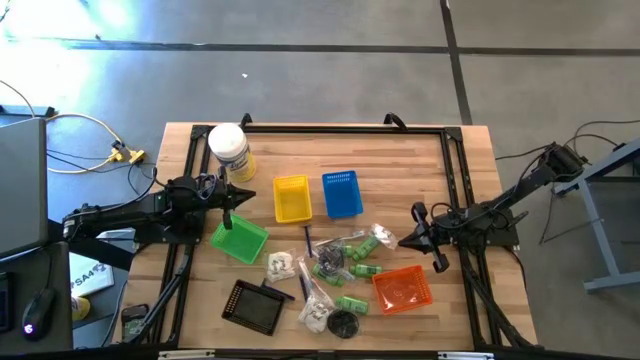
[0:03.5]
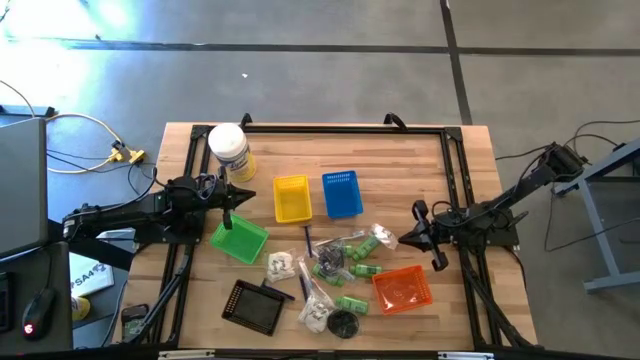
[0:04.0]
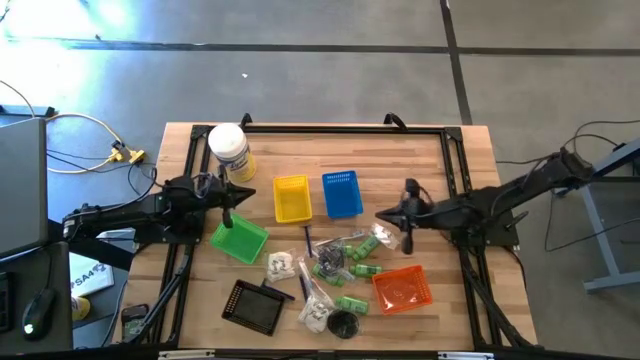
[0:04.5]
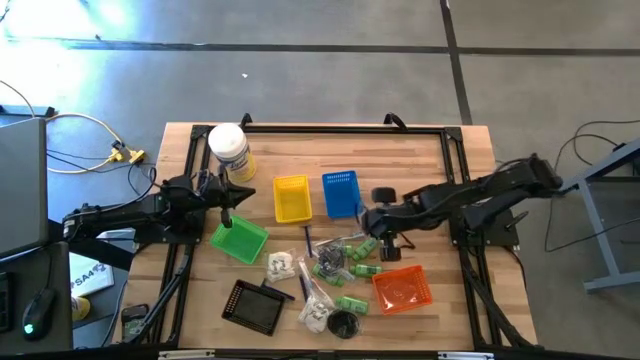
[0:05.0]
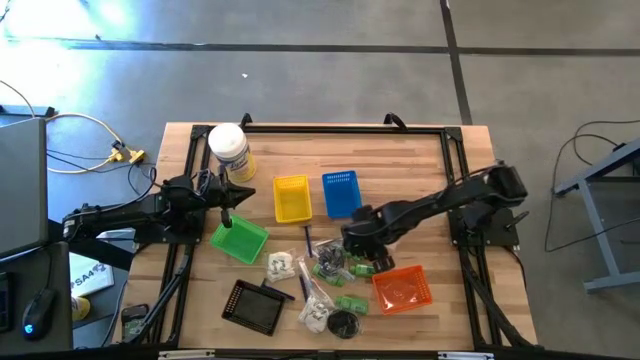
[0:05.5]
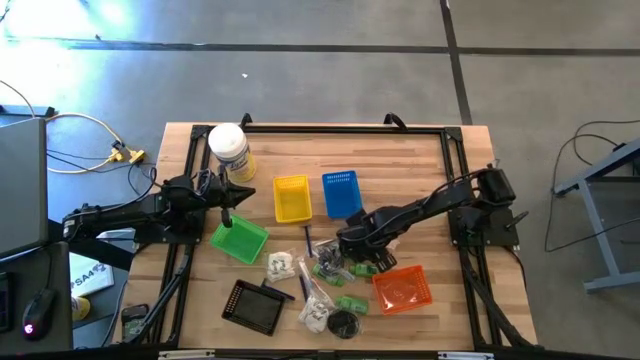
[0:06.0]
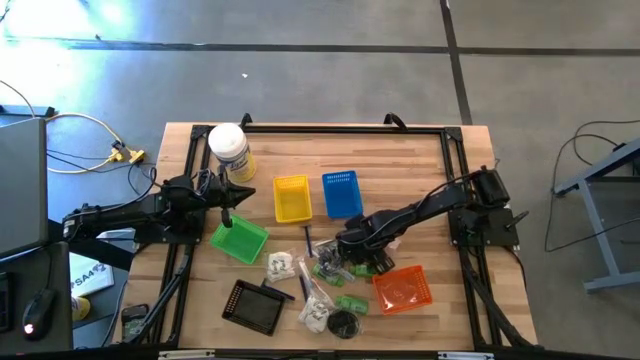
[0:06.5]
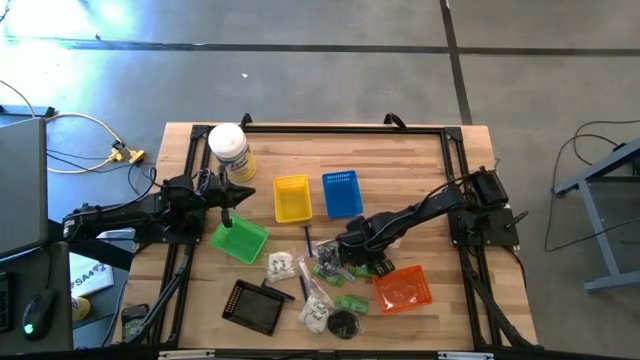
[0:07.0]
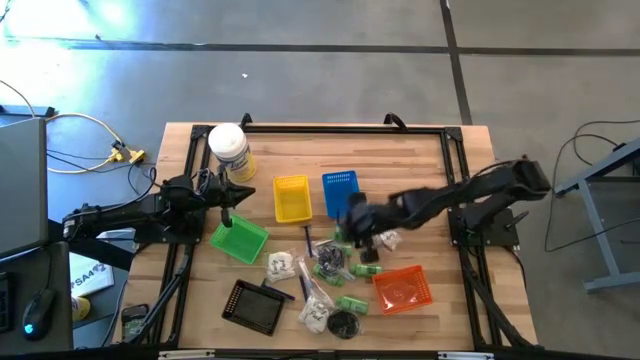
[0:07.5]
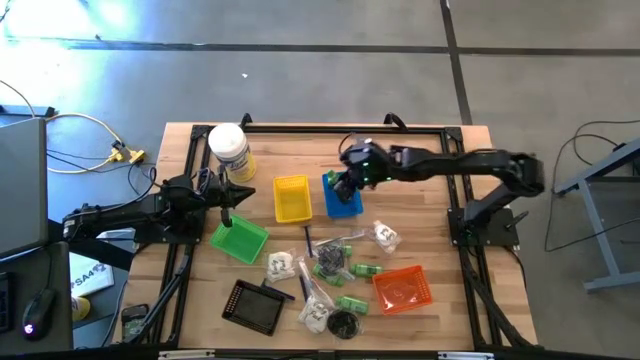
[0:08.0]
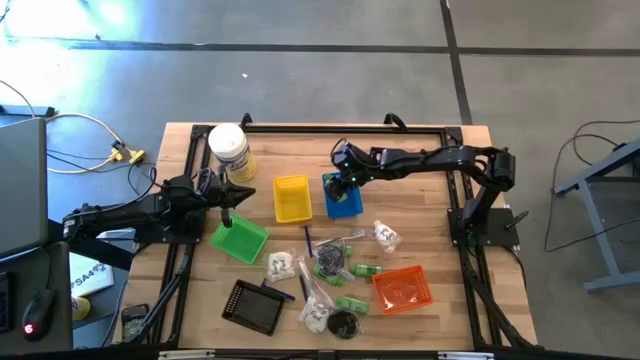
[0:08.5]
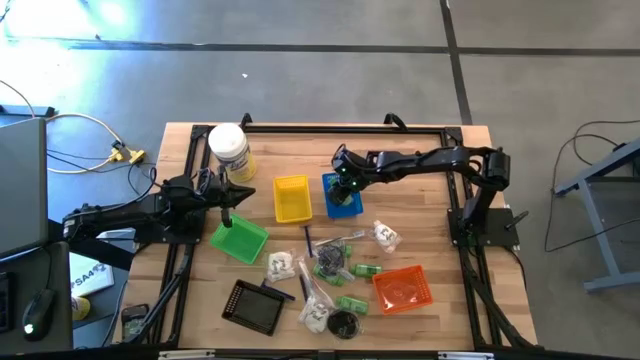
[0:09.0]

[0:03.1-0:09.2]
Task: Pick & Place Travel size toiletries
Put the shampoo into the blue bin

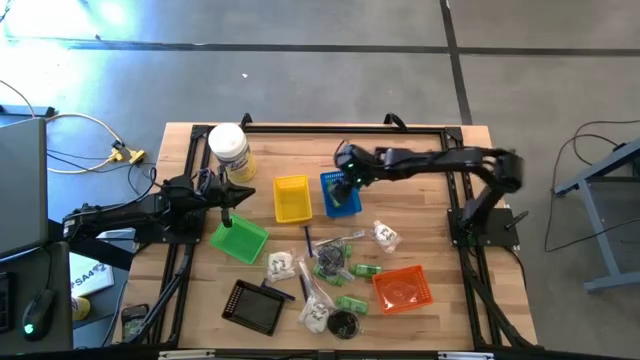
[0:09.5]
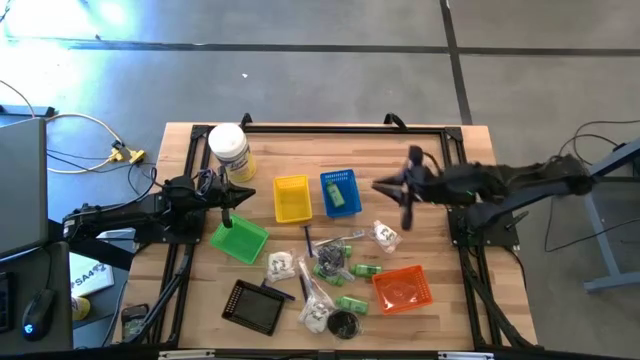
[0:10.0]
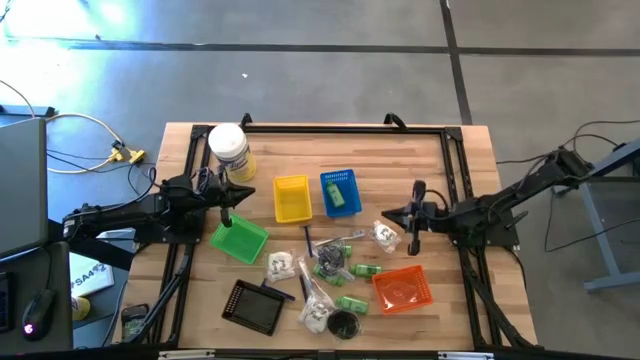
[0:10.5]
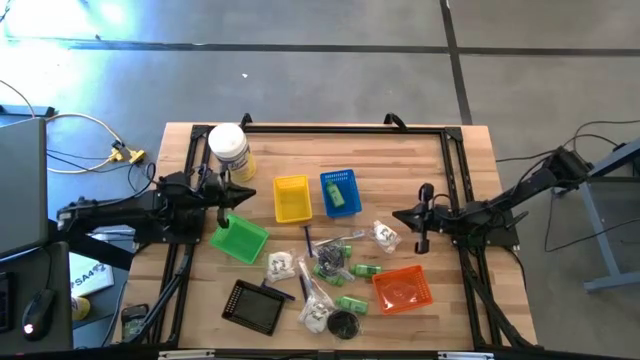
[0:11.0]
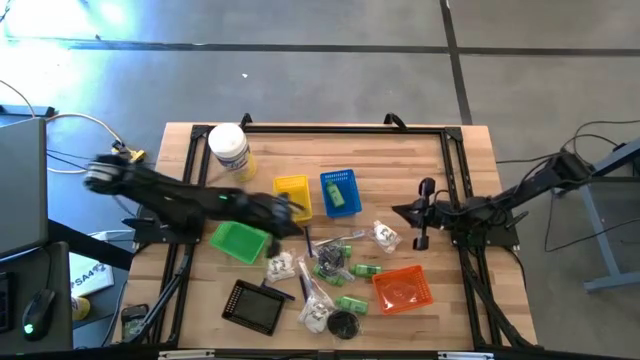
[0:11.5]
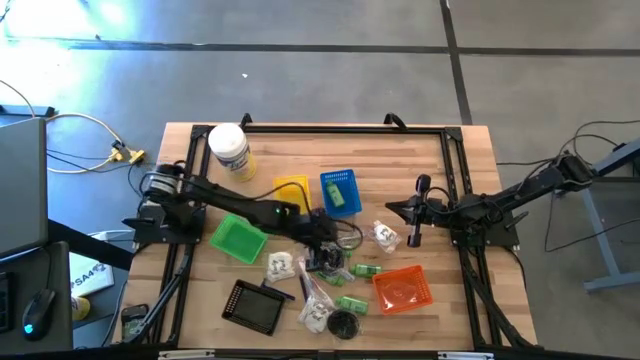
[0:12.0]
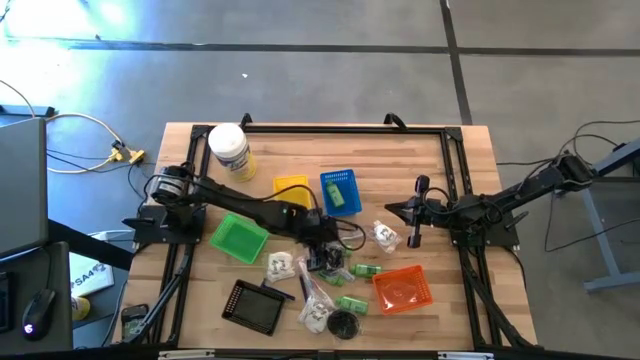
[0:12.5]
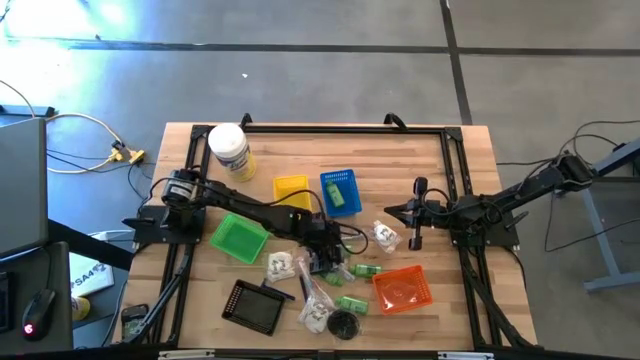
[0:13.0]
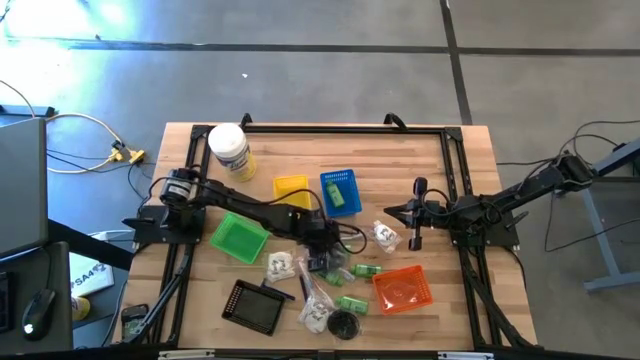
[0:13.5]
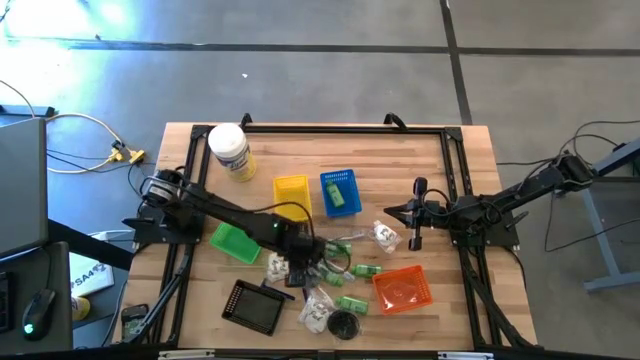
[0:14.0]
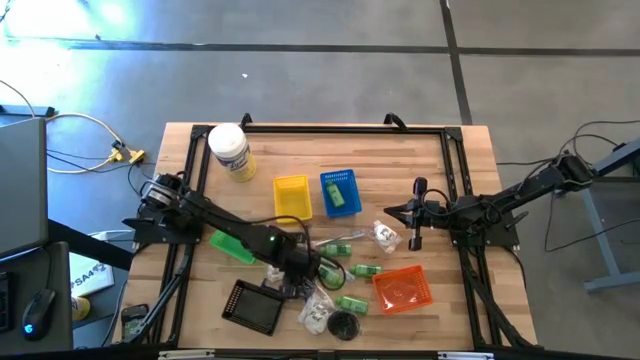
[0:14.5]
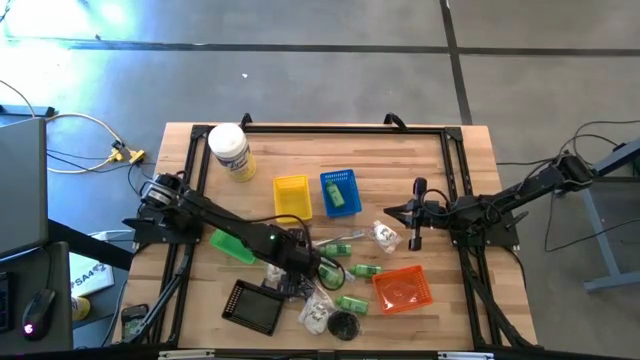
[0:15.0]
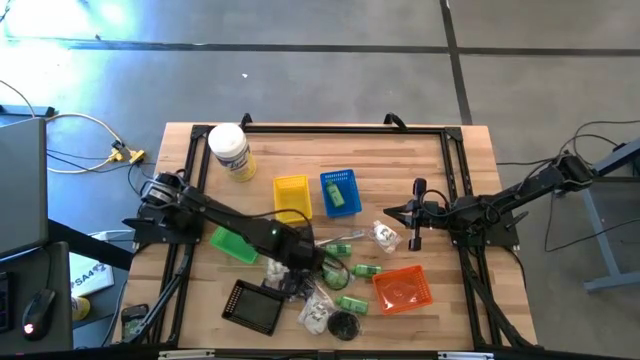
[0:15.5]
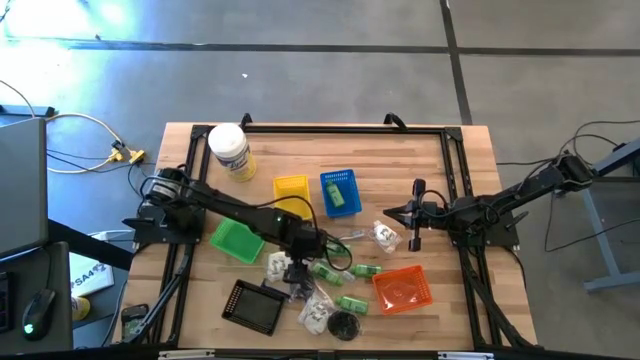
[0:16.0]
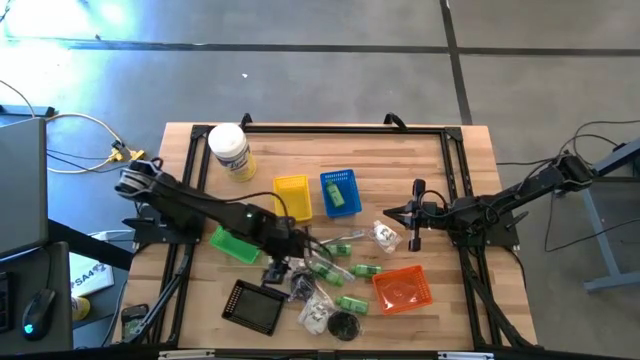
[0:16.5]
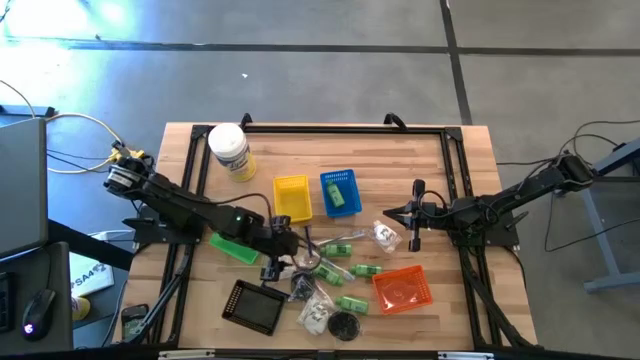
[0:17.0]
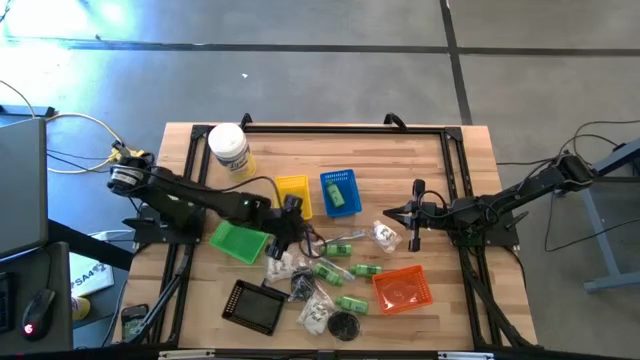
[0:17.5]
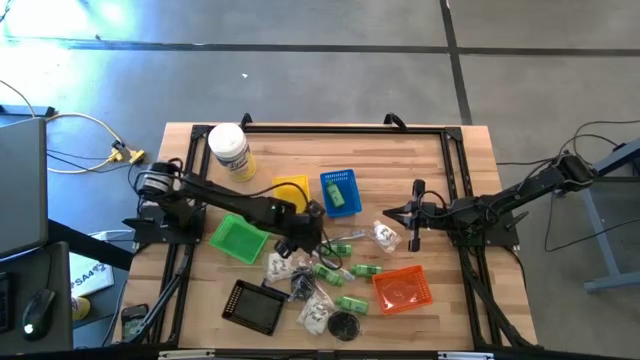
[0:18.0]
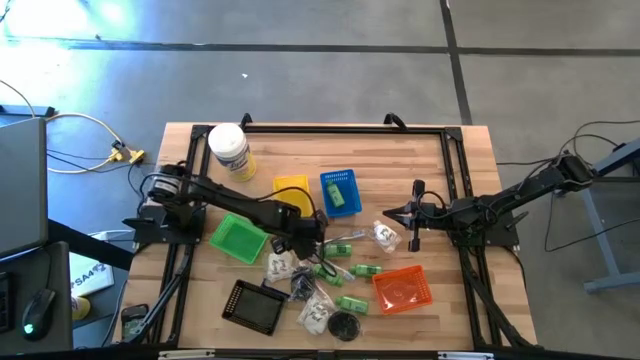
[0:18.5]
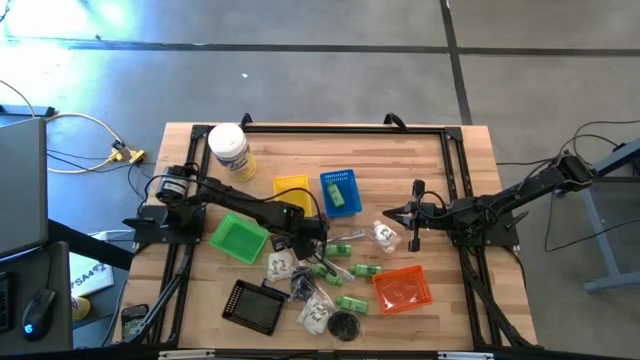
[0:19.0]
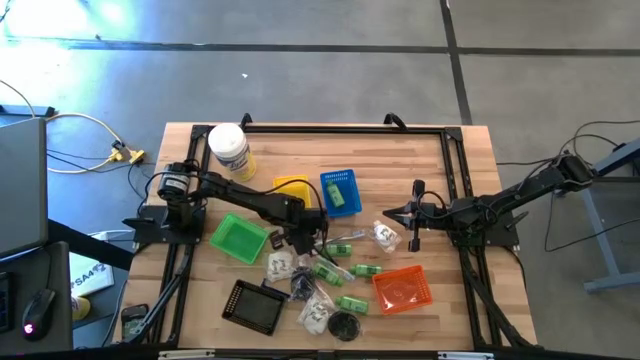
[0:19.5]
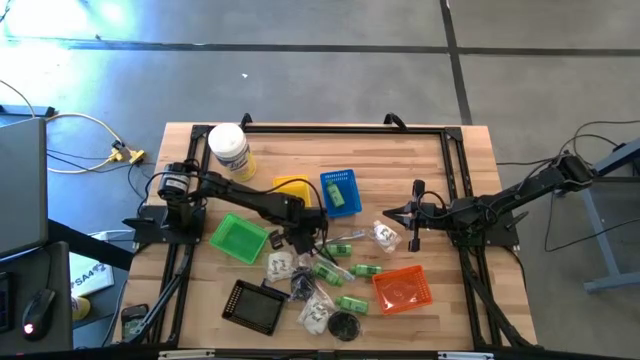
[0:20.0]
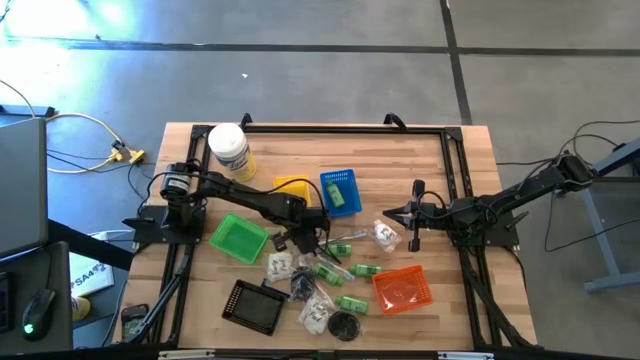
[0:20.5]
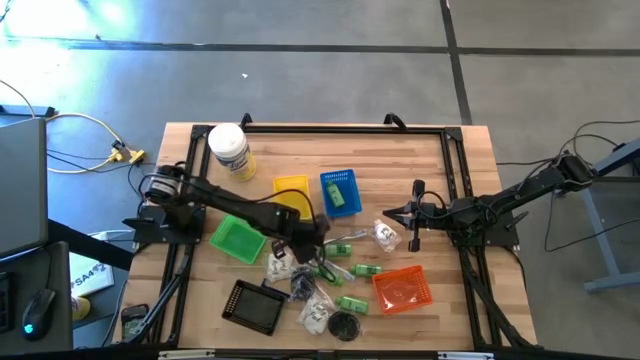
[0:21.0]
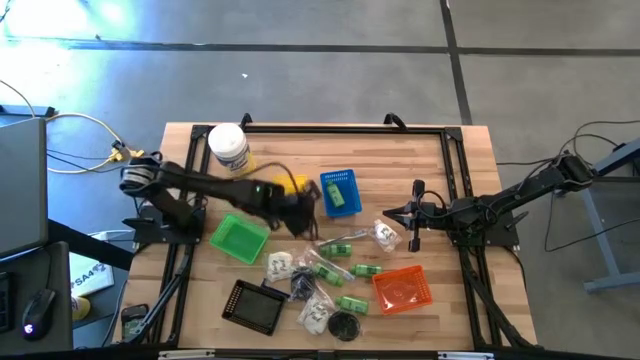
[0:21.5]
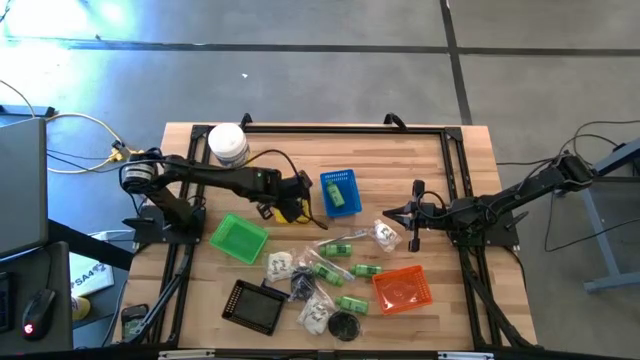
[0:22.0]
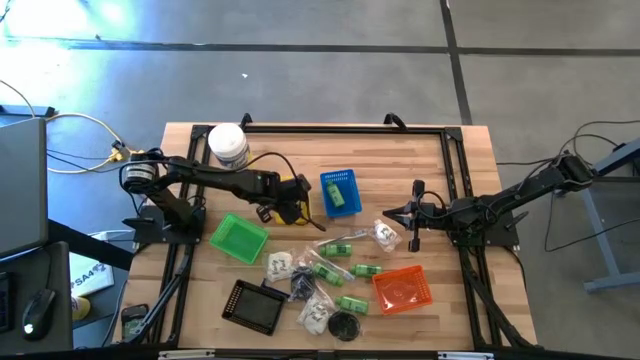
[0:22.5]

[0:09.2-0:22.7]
Put the razor into the yellow bin

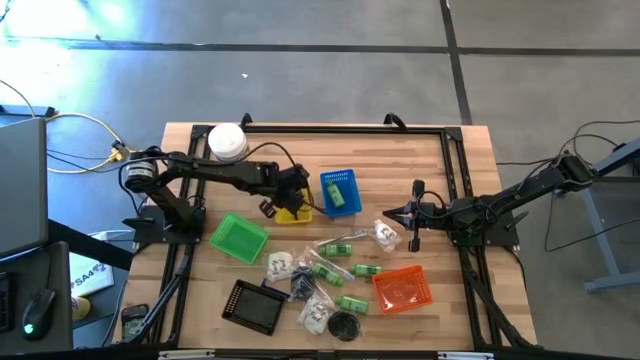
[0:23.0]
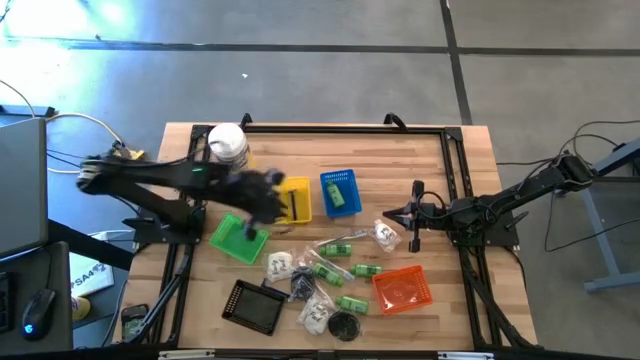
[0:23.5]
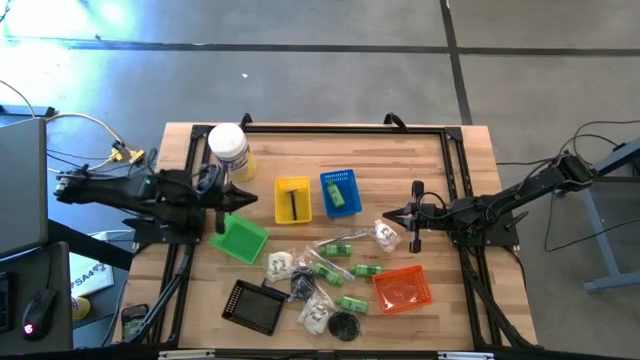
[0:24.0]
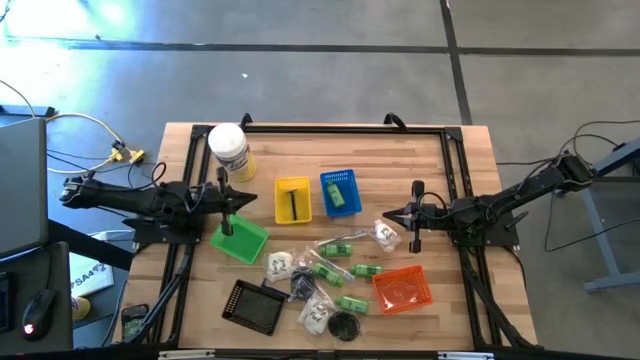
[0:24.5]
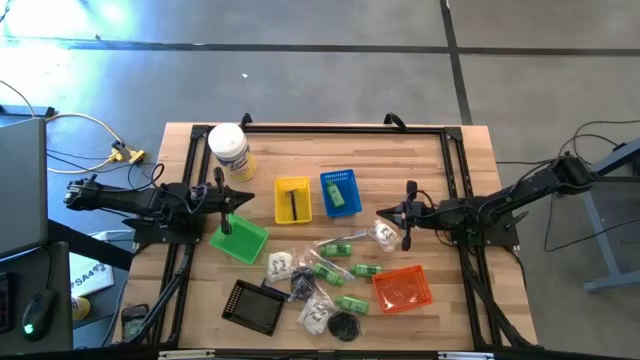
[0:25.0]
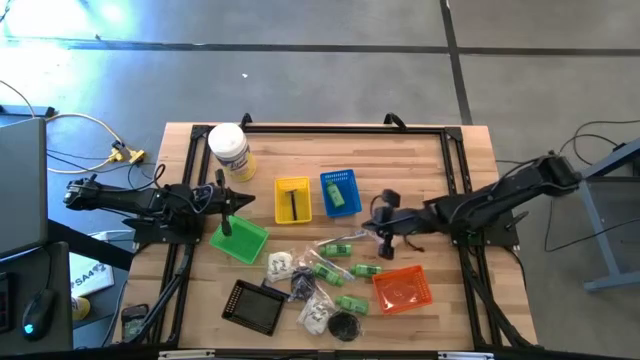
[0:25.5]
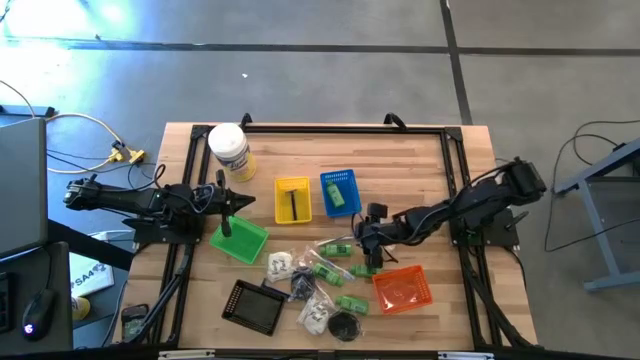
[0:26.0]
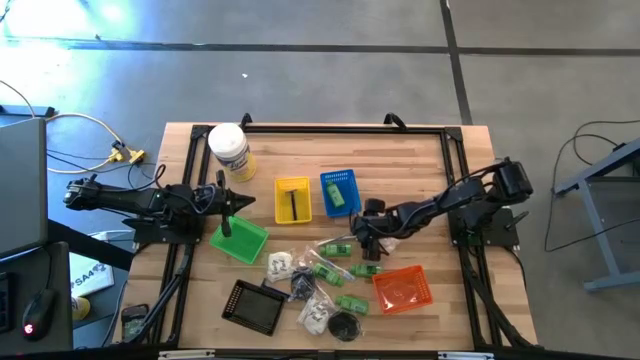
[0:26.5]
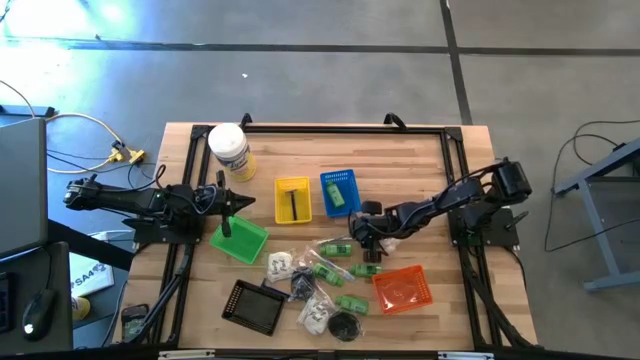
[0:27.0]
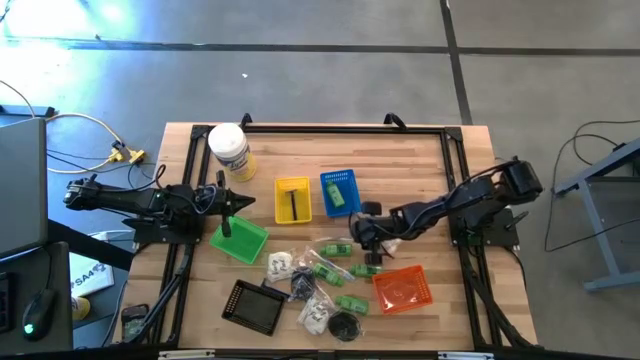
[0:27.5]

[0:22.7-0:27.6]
Put the dark blue toothbrush into the green bin
